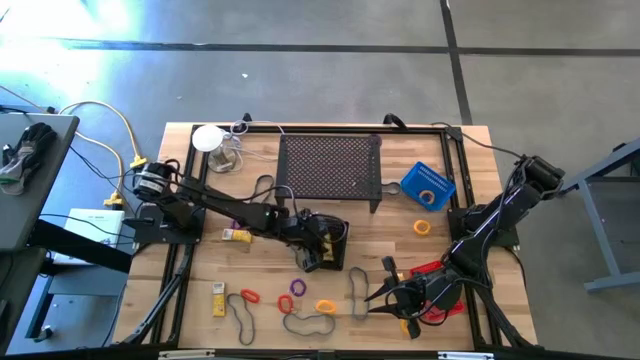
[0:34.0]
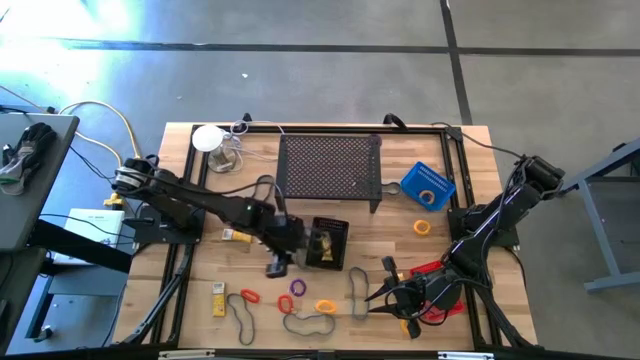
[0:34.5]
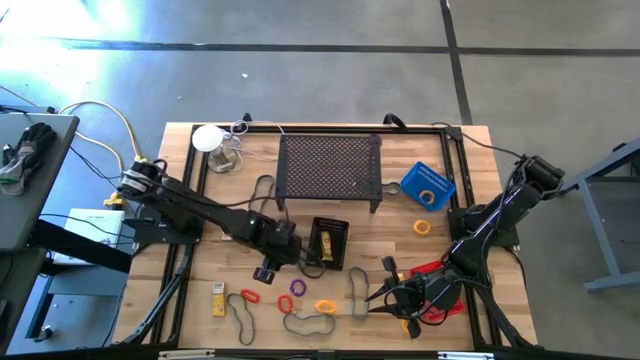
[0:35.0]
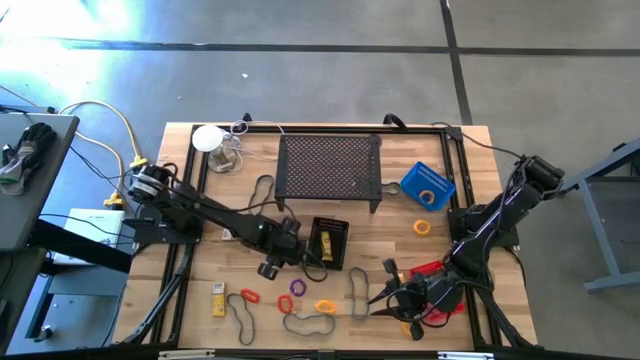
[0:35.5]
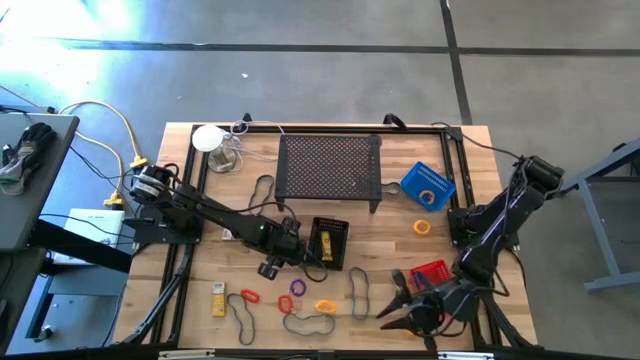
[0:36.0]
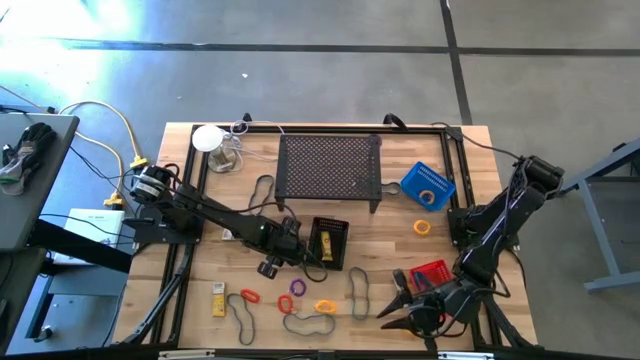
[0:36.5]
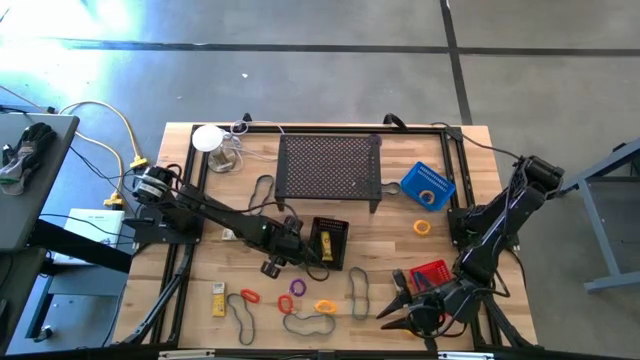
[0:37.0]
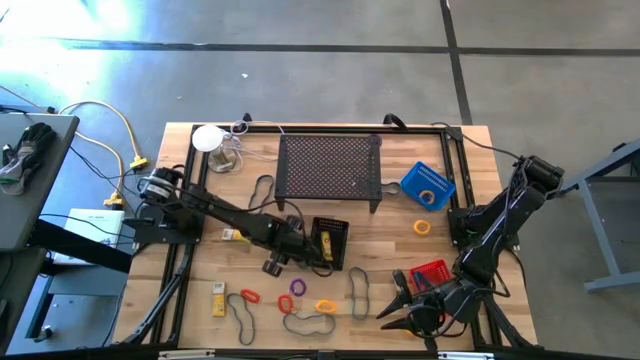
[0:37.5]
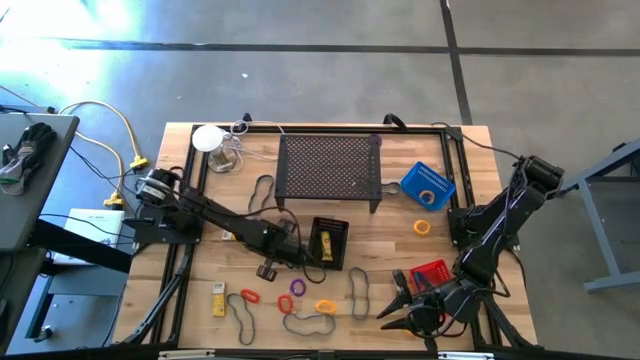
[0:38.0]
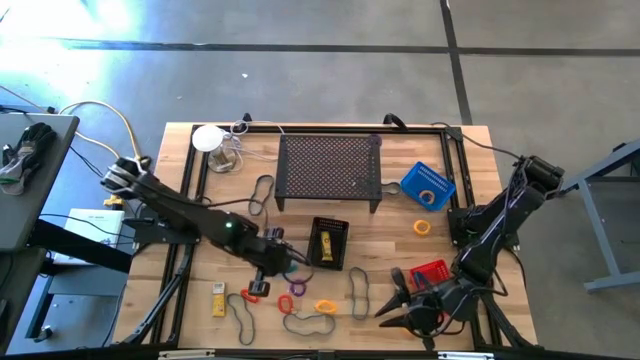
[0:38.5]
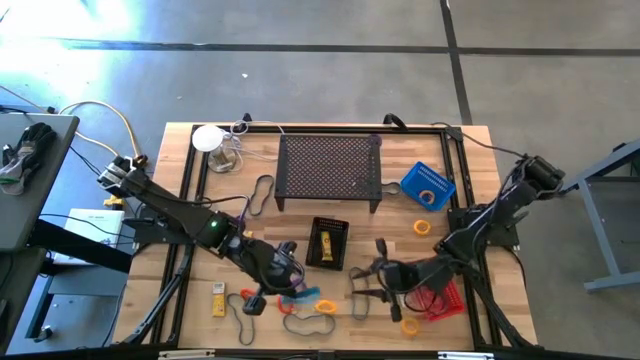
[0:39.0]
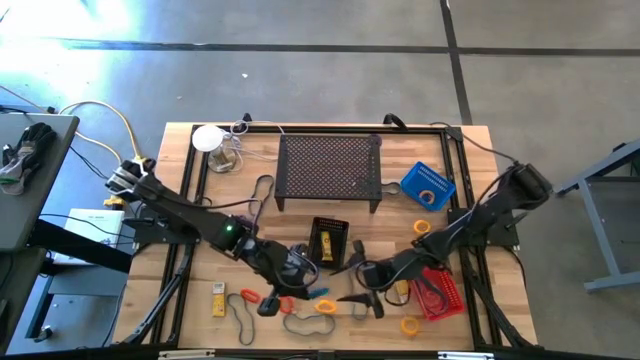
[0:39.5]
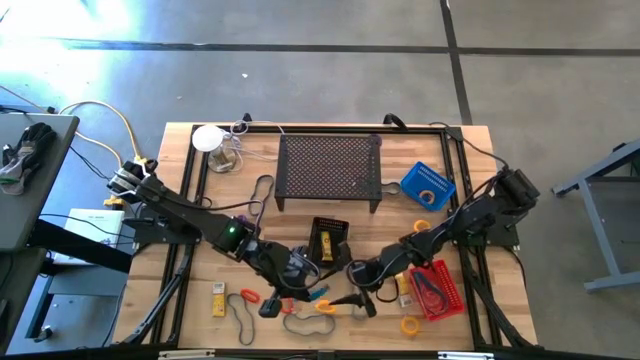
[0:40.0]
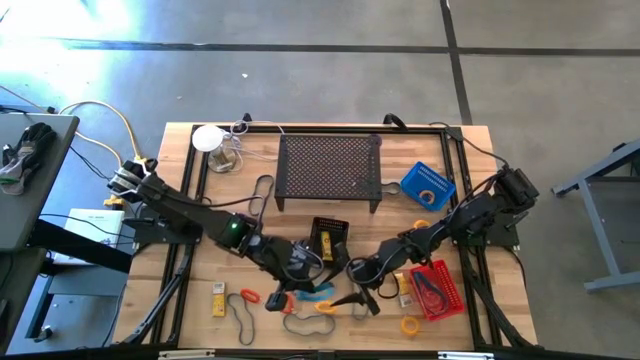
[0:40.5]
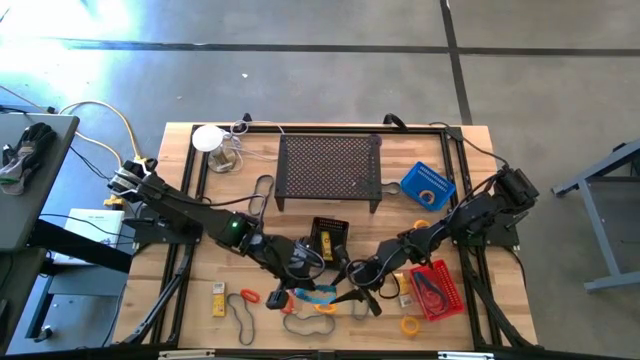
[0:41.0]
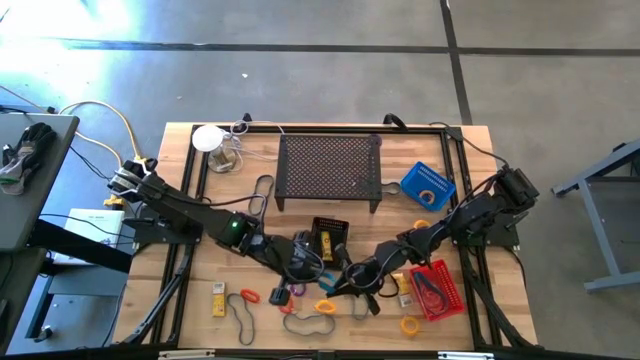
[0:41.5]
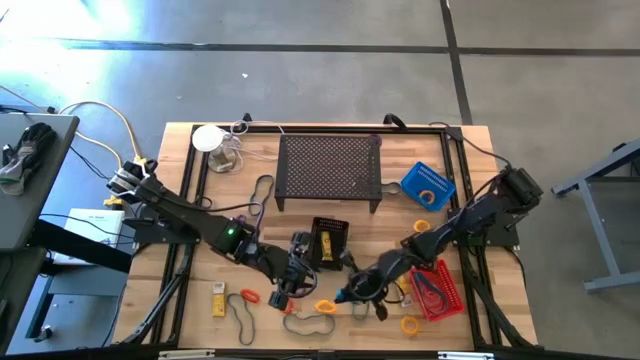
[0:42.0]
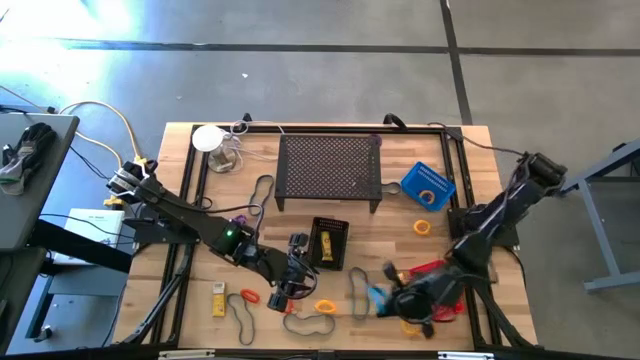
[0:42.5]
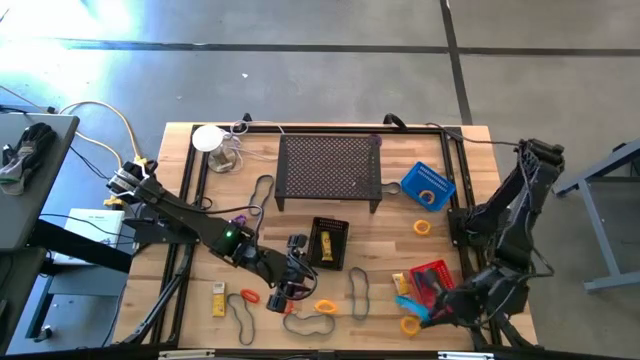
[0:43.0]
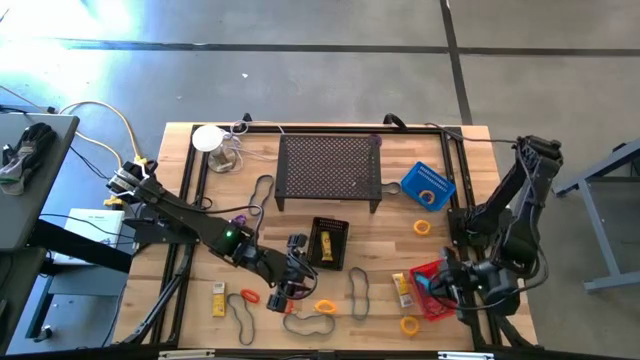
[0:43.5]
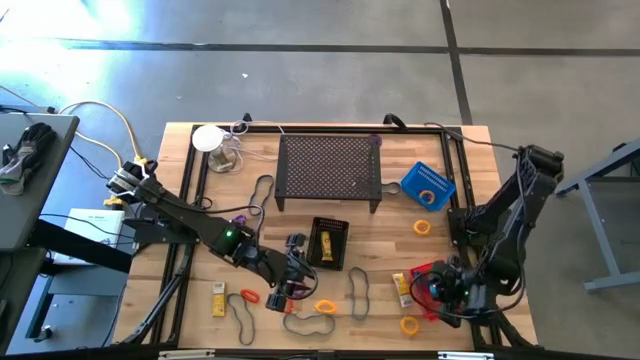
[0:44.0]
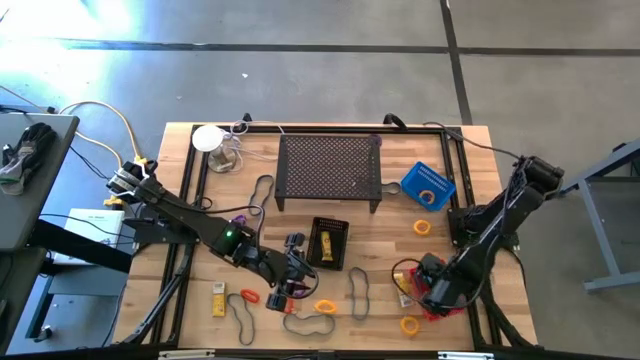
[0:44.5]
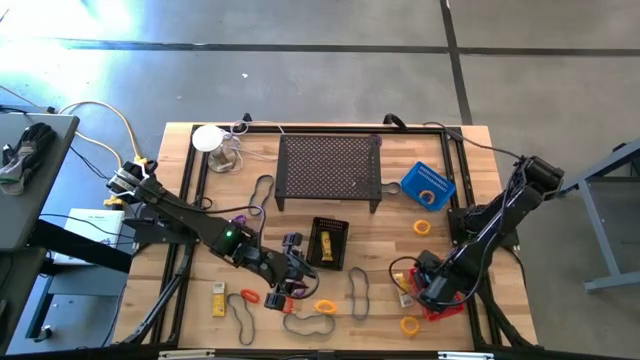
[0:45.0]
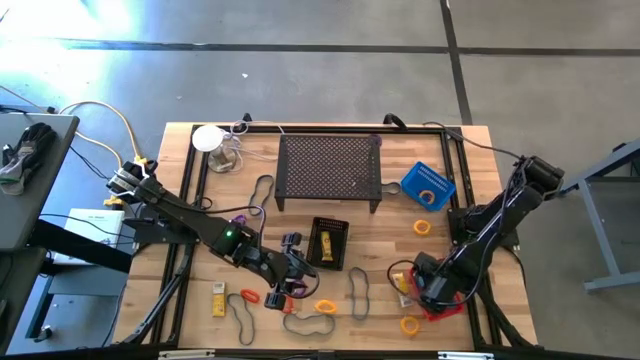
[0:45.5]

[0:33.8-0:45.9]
Task: Pick & Place Office Desk Supplies
Put the blue rubber band into the orange bin

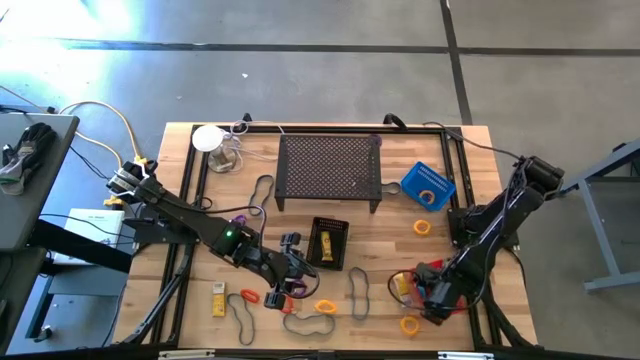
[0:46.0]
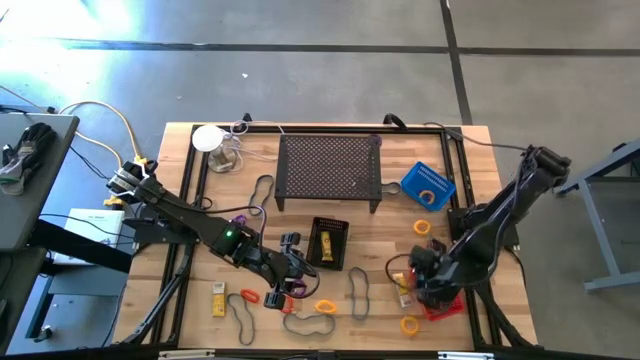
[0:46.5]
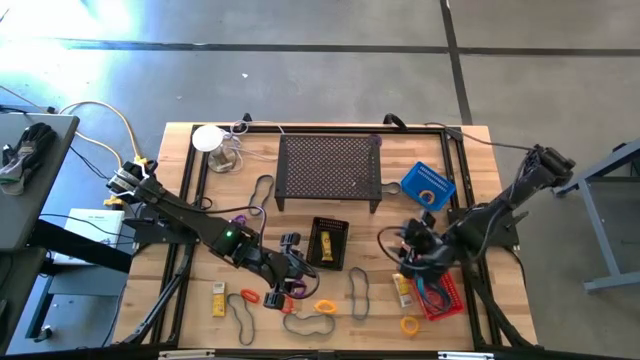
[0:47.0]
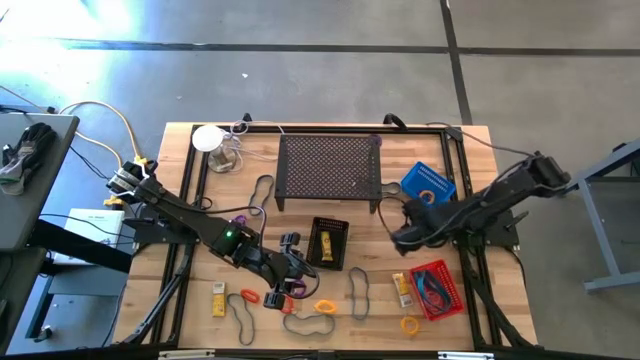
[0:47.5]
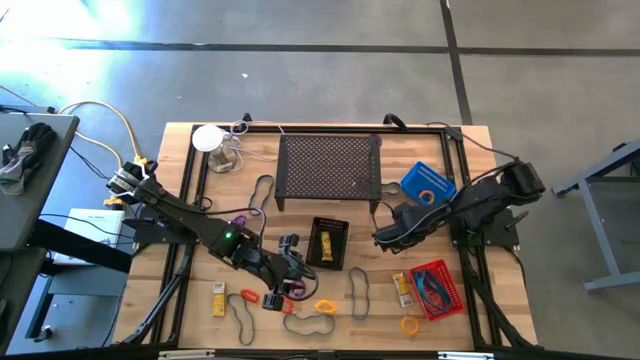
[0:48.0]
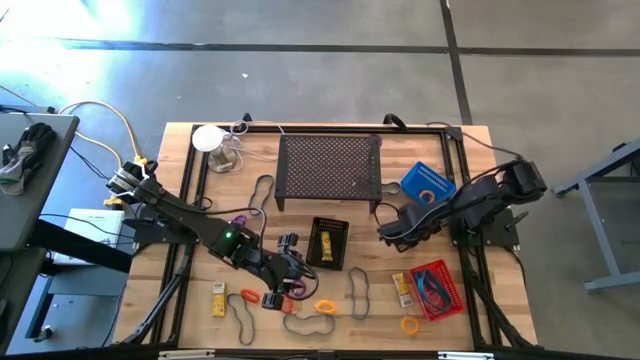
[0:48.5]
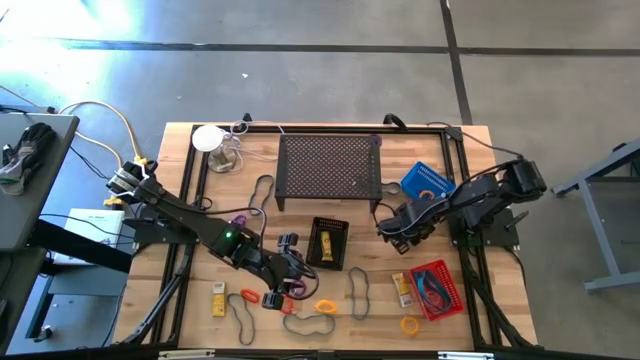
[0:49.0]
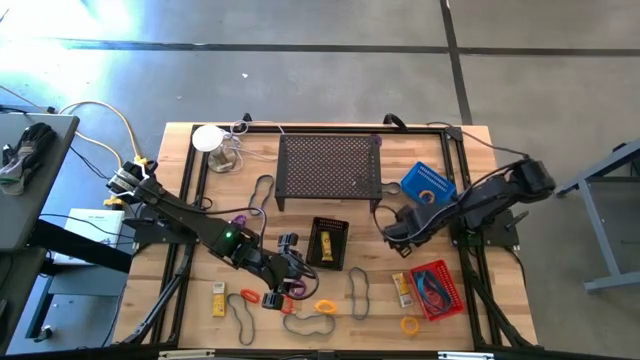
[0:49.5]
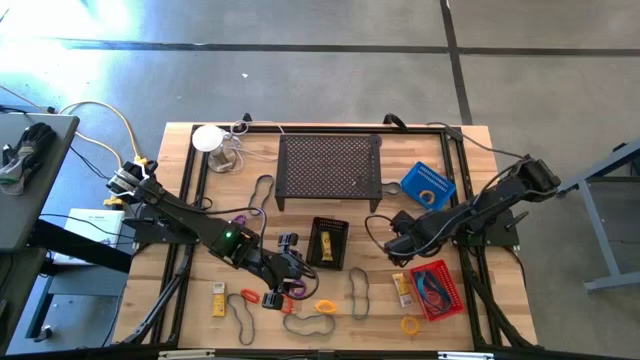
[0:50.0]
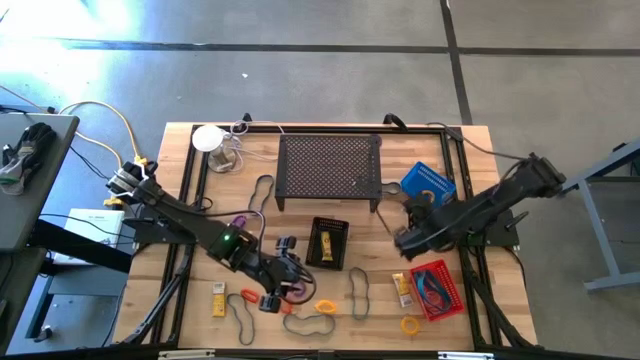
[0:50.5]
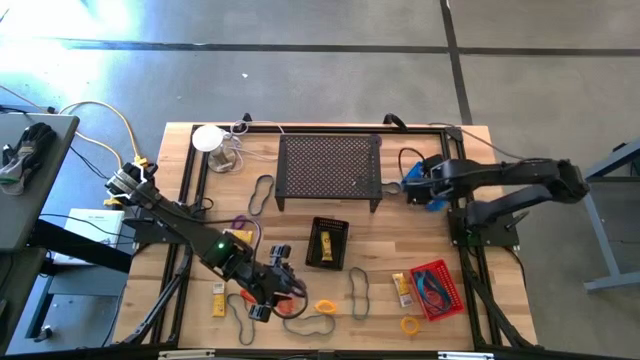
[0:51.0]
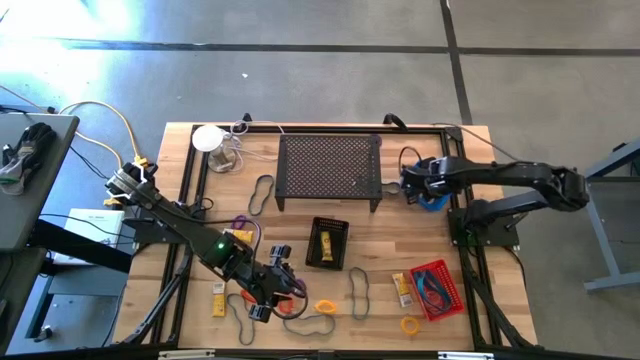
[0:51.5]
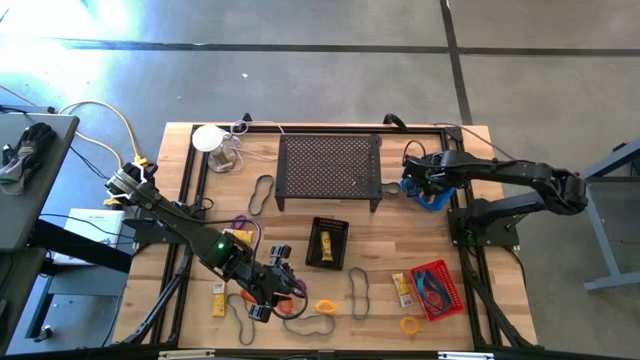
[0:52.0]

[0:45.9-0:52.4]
Put the yellow spring keychain into the blue bin
